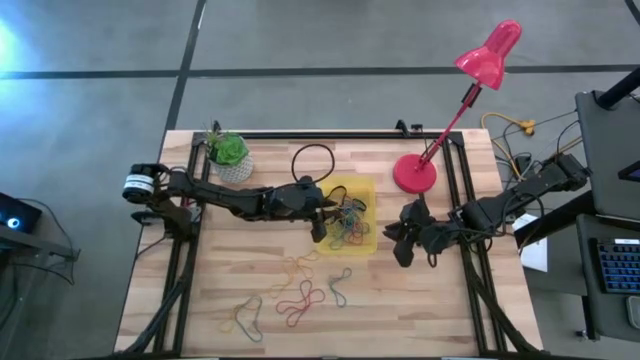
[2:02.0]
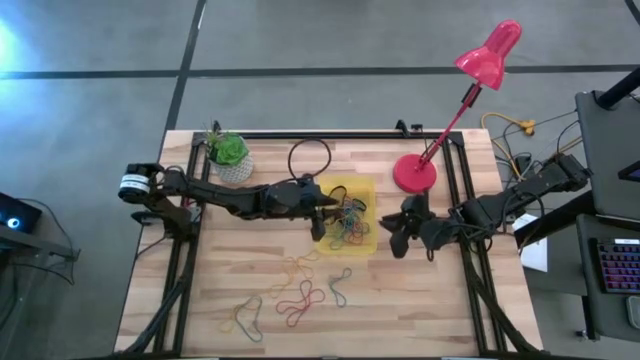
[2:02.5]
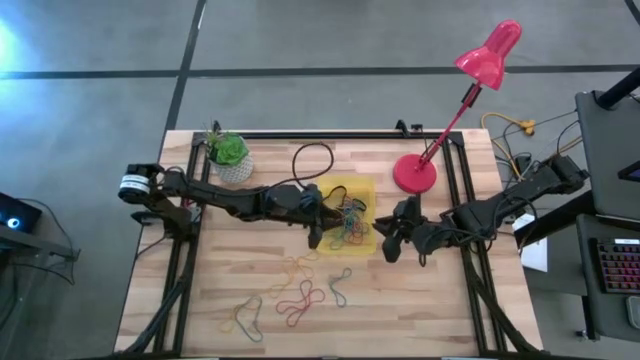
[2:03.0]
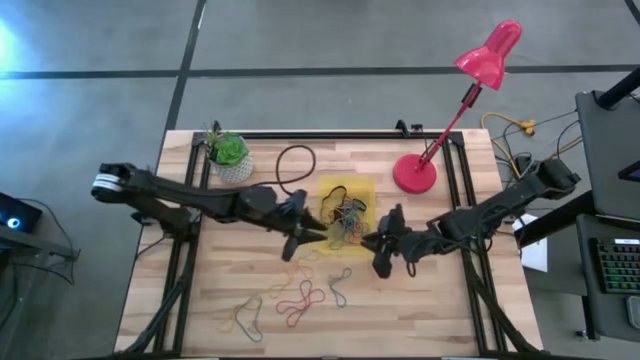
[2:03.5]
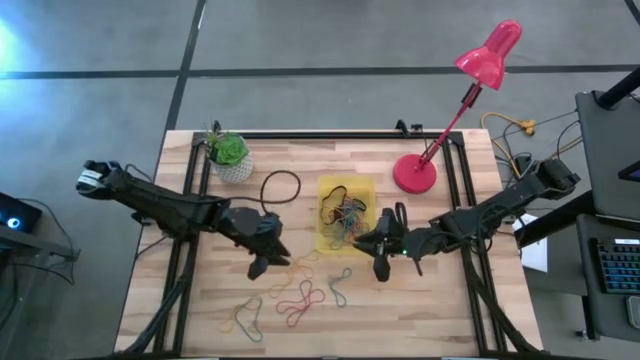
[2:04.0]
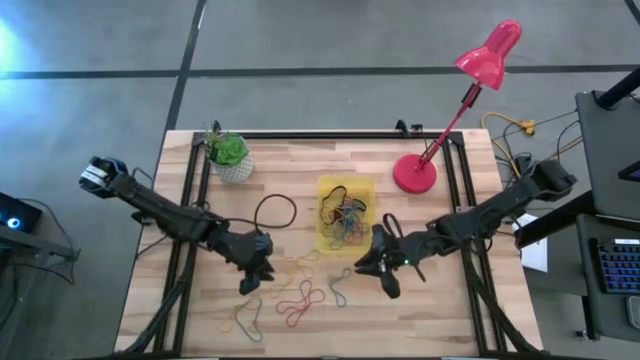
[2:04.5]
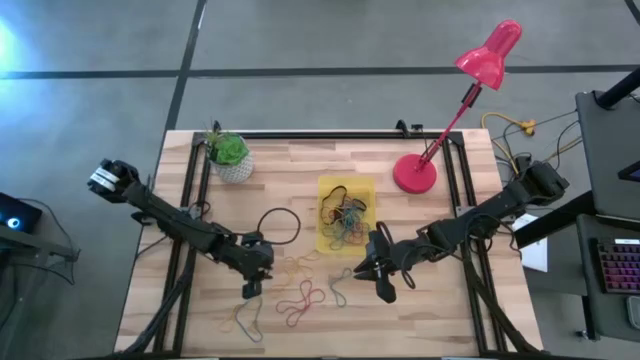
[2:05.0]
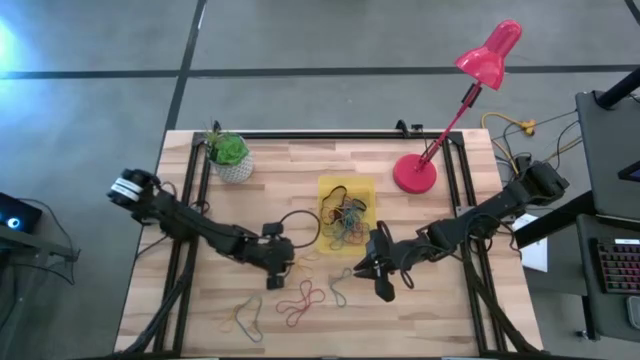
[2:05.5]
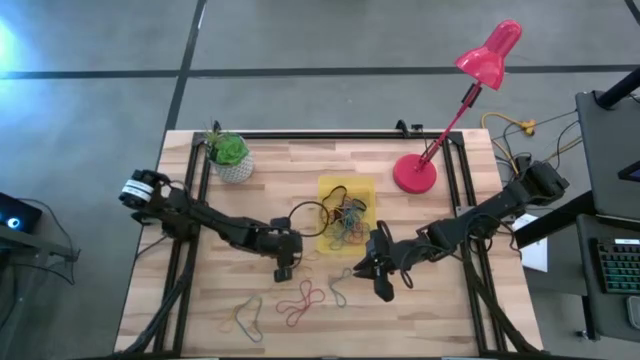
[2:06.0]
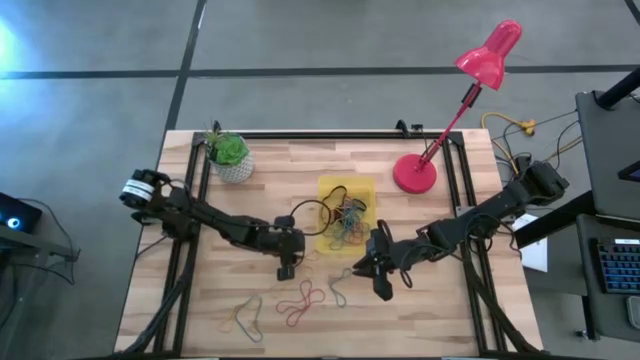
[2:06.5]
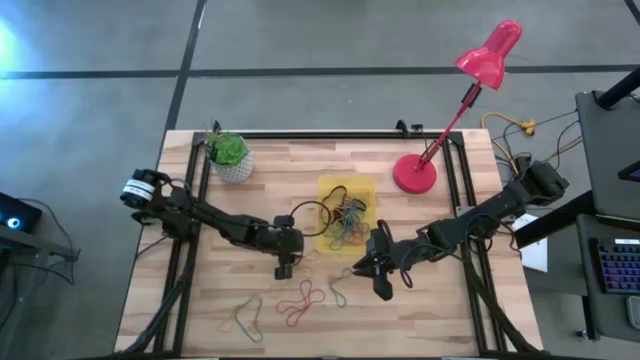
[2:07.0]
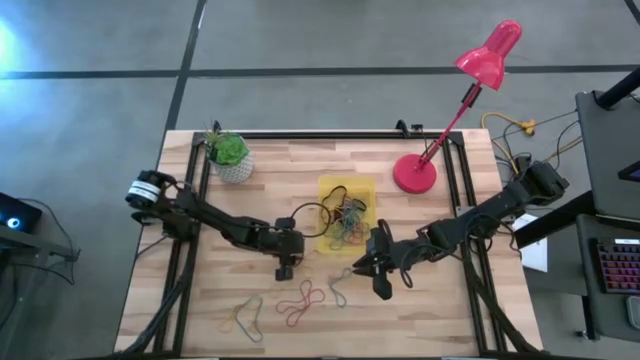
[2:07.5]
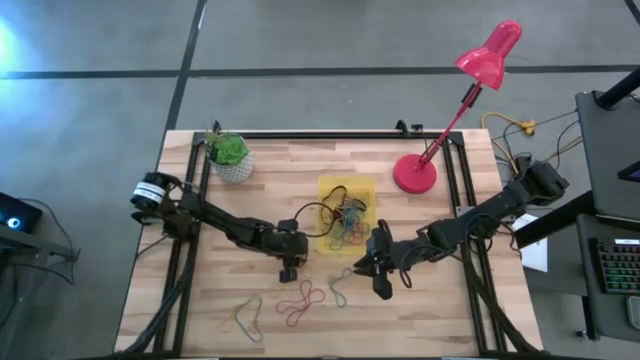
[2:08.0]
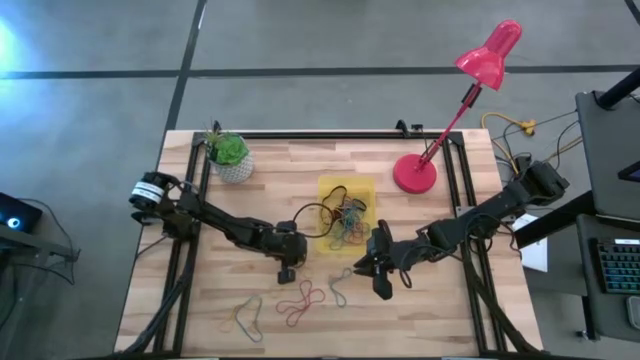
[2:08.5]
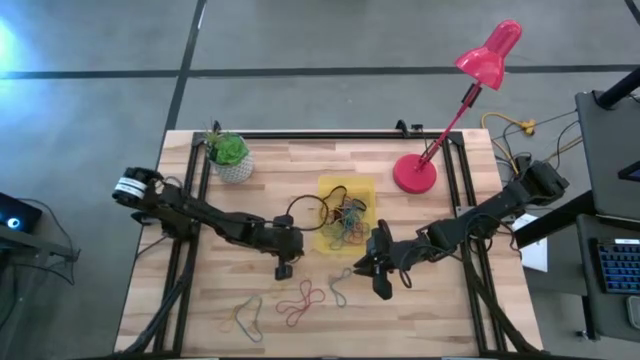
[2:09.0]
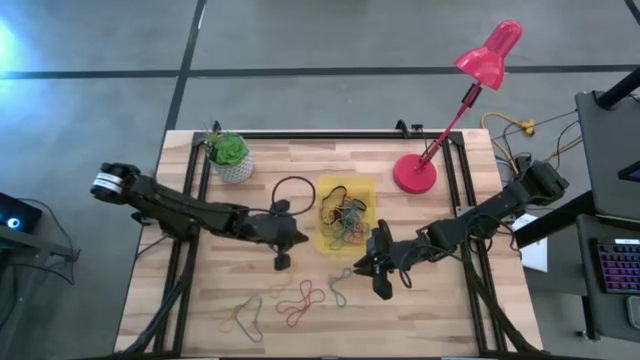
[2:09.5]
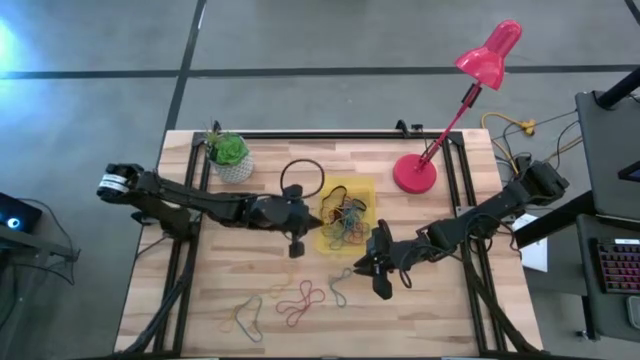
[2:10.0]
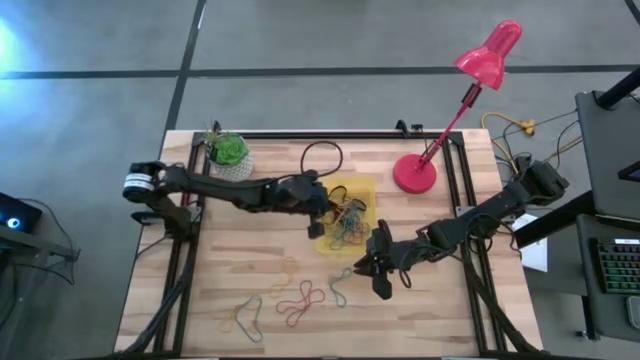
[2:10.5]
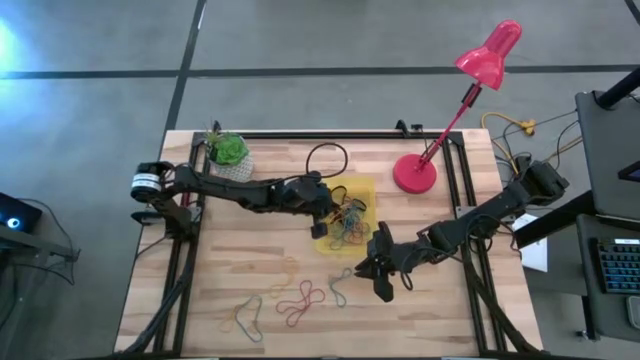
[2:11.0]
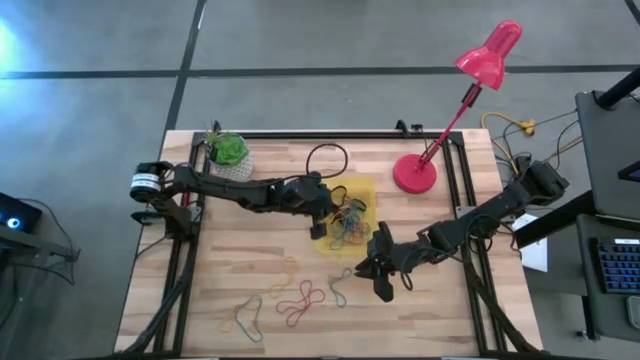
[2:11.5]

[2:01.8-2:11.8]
Task: Pick and place rubber bands into bin
Put the right yellow rubber band into the bin

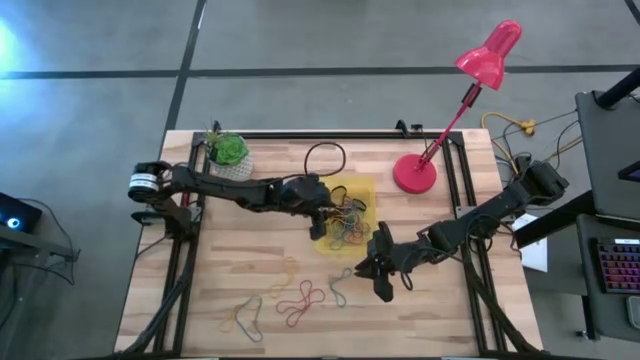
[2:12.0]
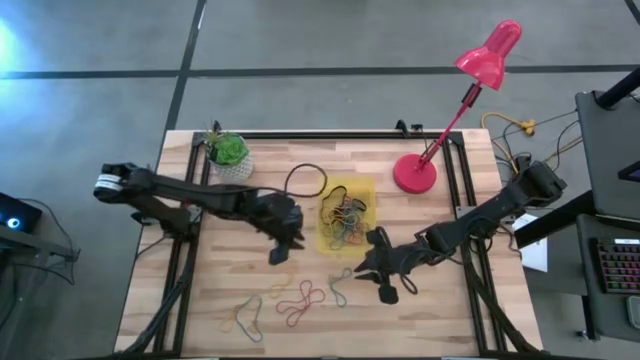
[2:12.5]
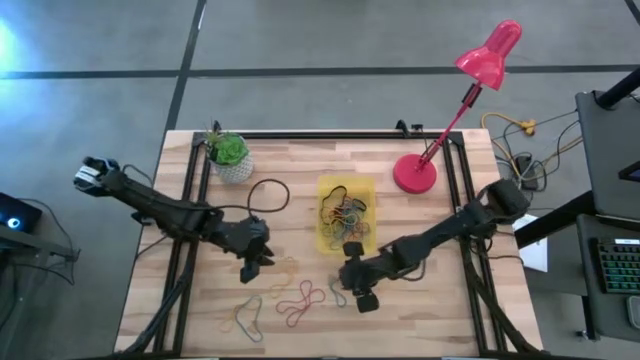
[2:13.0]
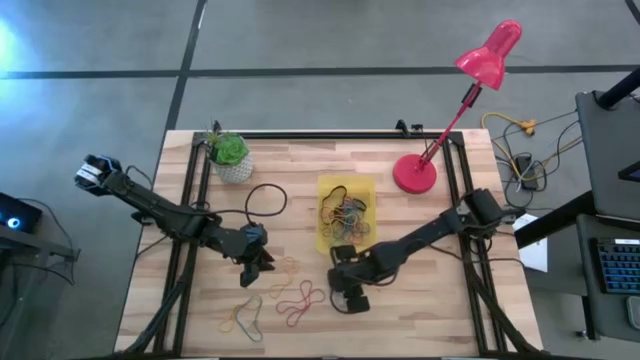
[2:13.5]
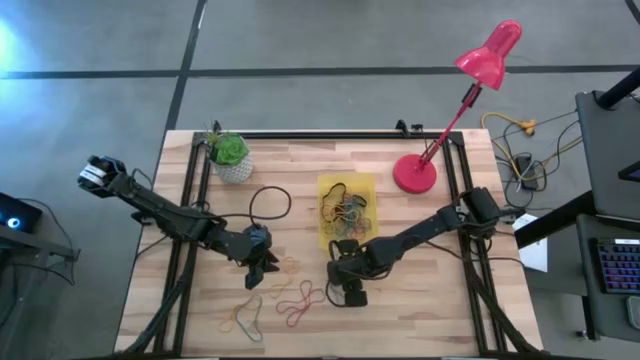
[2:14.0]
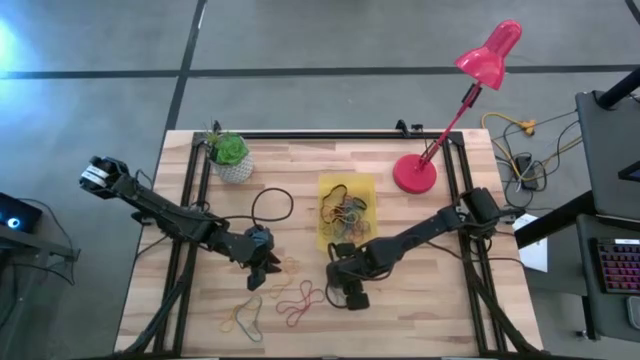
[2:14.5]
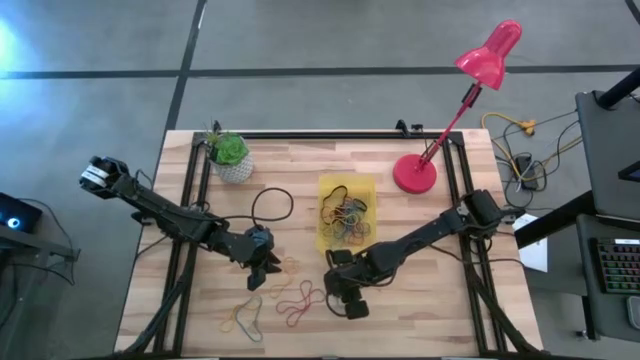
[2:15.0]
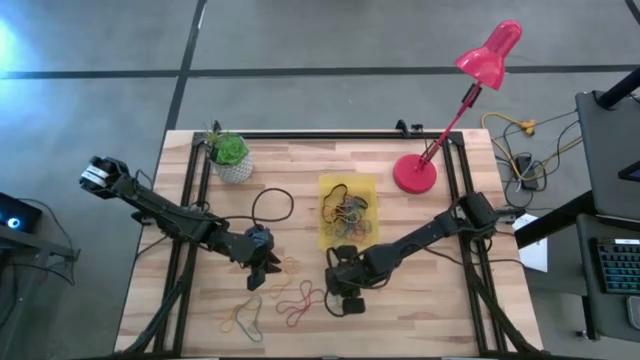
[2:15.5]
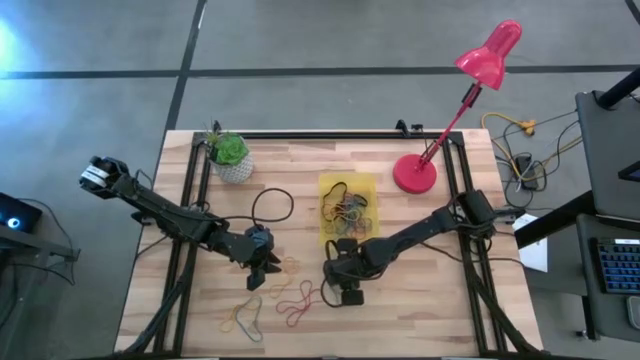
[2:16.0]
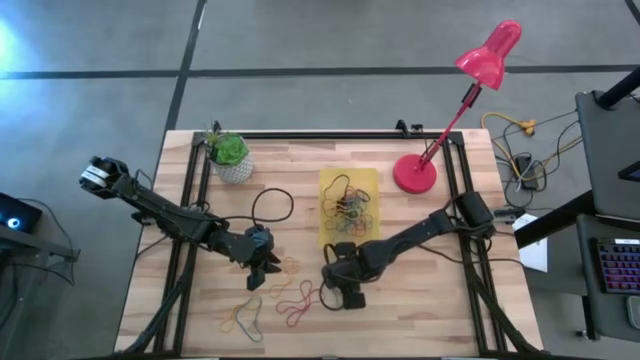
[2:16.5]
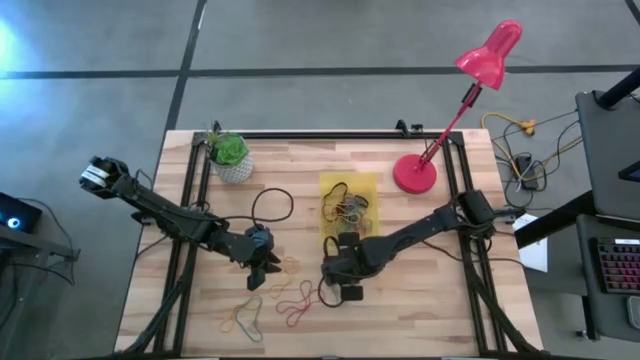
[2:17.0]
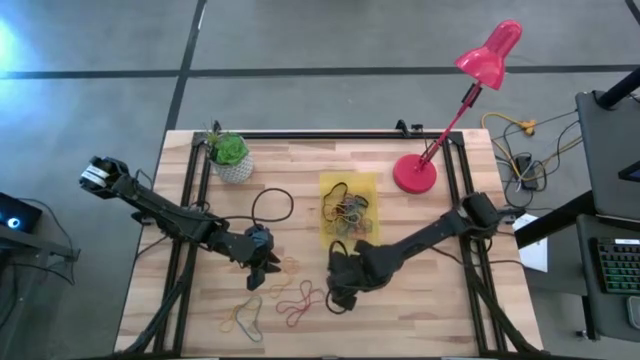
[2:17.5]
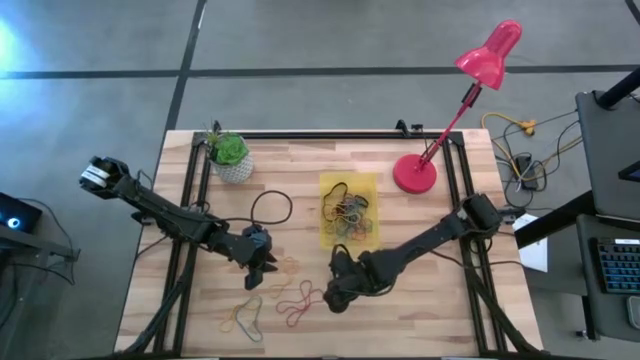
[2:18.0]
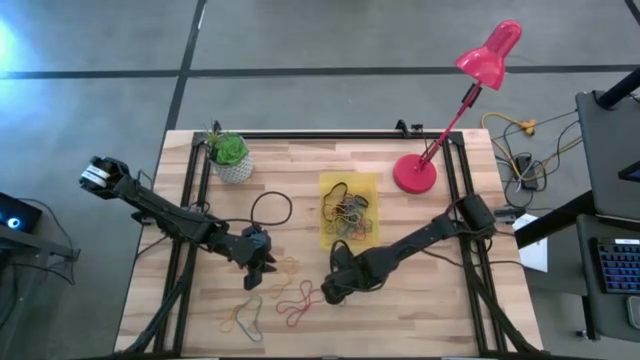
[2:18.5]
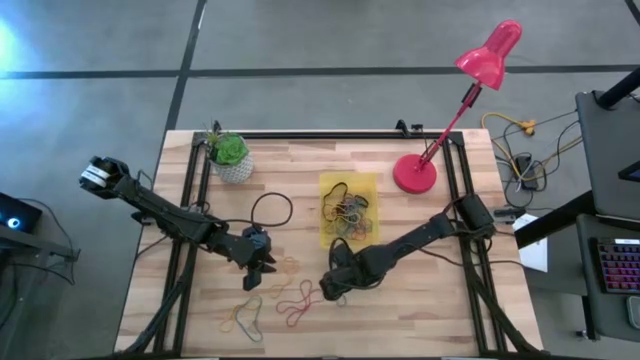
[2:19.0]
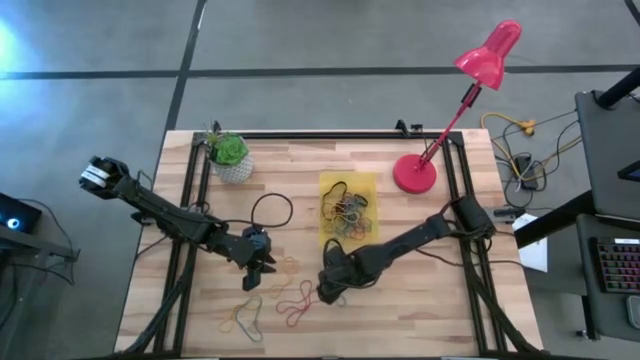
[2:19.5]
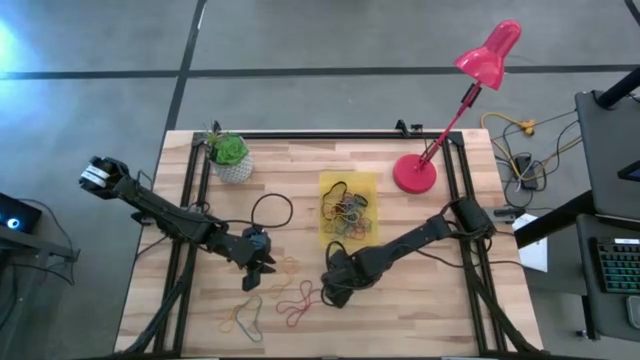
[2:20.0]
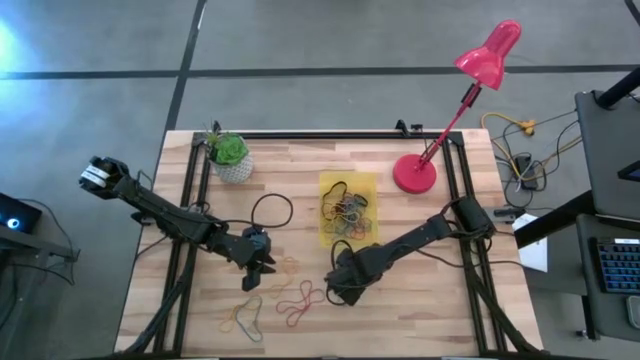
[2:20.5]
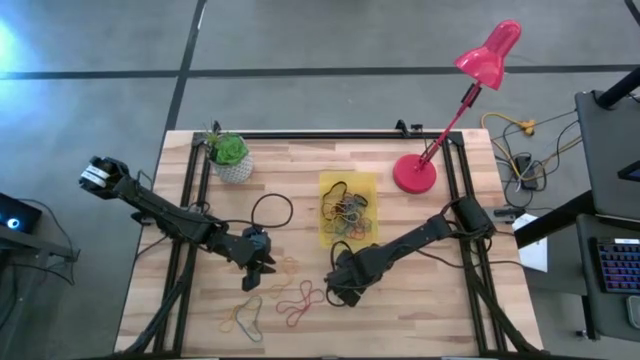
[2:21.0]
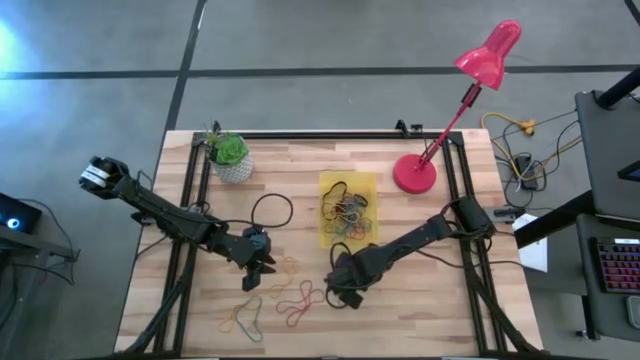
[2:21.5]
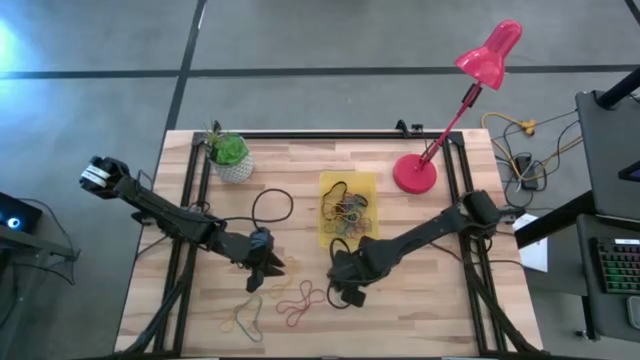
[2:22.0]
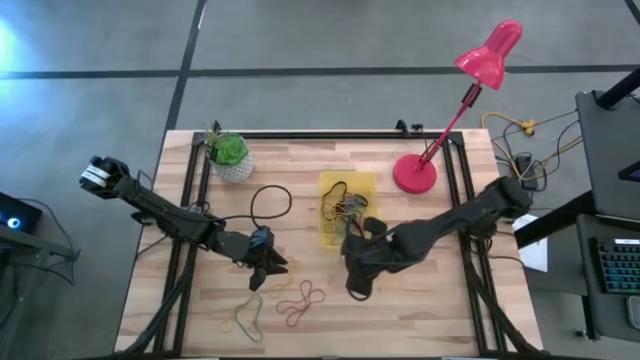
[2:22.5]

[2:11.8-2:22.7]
Put the right blue rubber band into the bin
